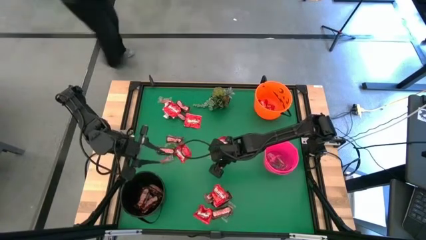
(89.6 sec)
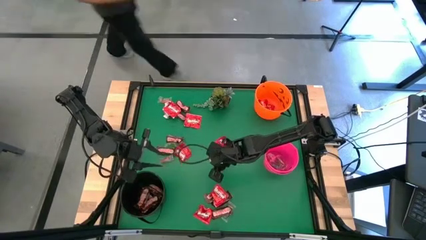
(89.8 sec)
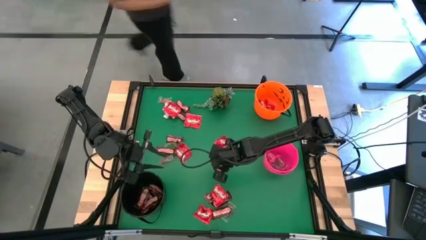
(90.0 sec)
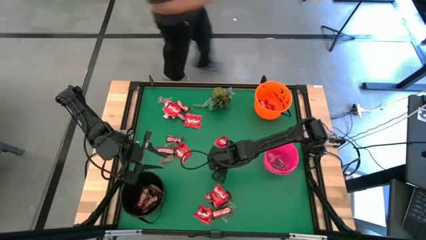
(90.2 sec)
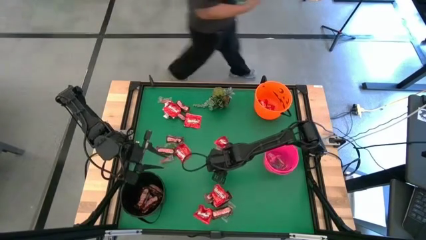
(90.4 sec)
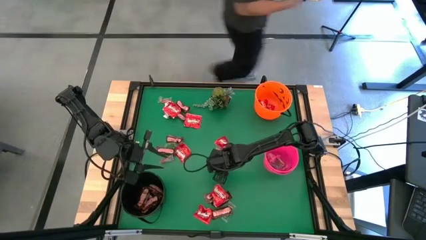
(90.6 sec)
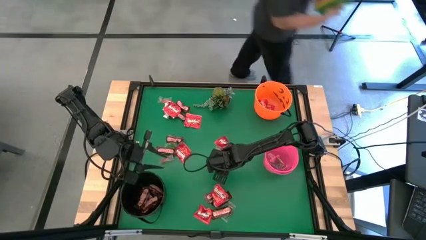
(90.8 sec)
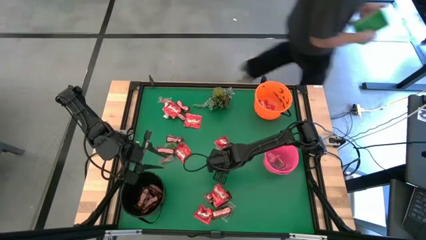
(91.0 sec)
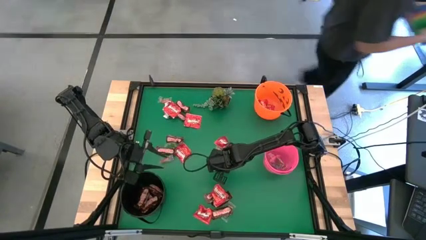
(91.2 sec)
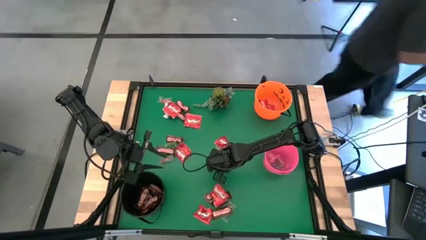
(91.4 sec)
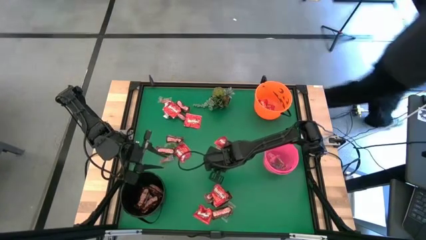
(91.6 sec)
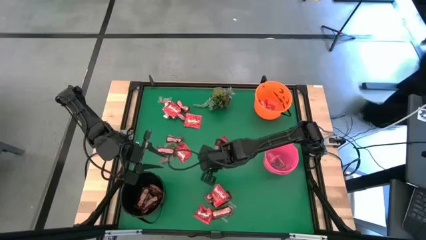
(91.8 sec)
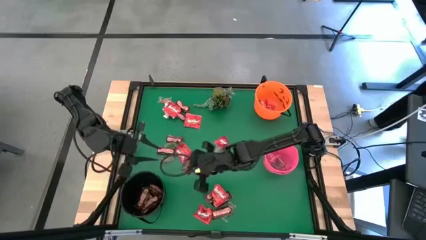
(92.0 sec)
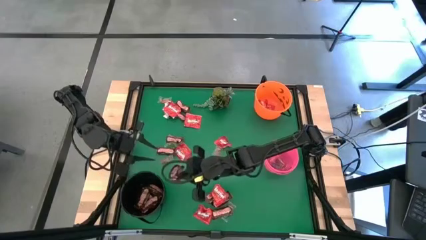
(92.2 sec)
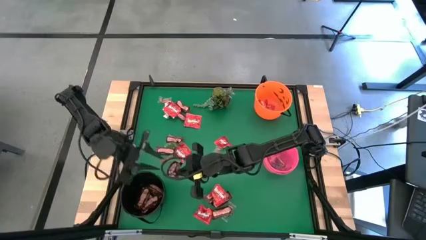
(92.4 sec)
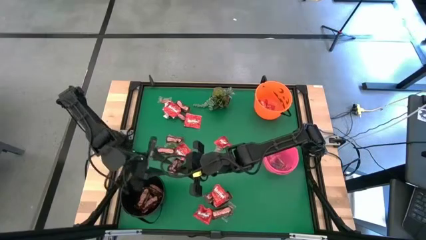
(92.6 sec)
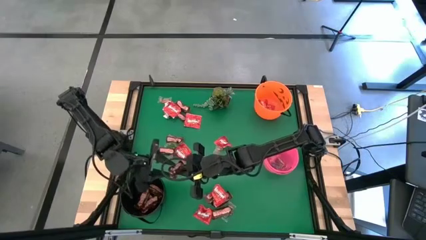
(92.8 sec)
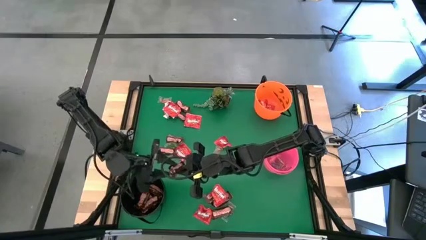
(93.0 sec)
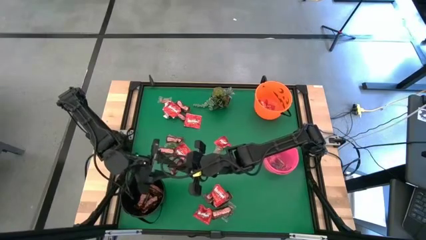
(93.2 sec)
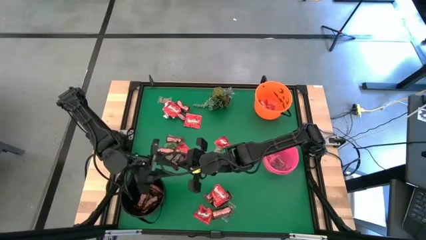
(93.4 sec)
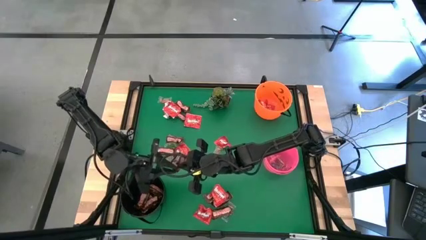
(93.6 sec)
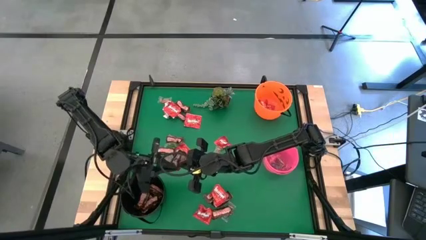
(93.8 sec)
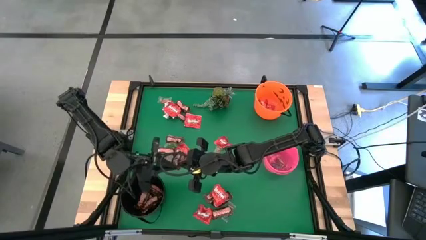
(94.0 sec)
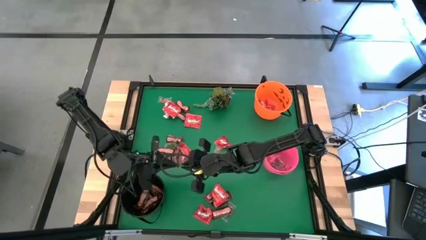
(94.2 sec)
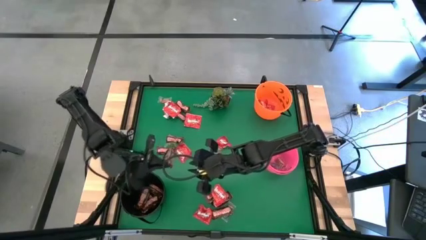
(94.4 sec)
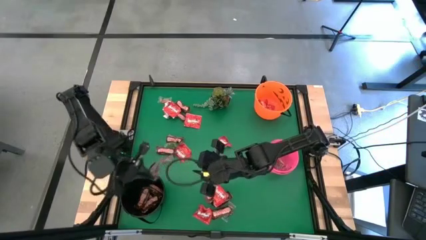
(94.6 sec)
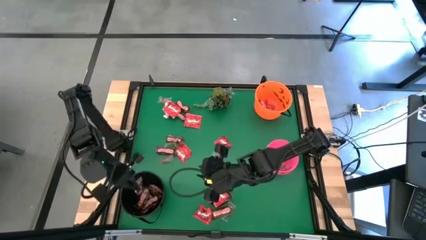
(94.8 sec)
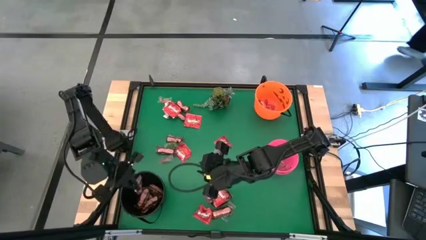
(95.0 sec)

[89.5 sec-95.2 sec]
Task: Sort candy
Put the brown chocolate bar into the black bucket

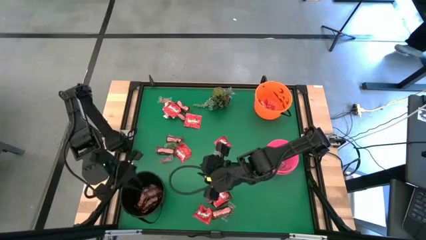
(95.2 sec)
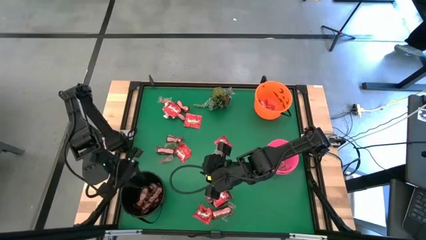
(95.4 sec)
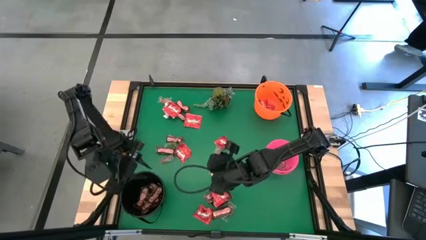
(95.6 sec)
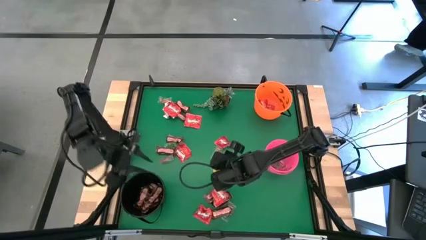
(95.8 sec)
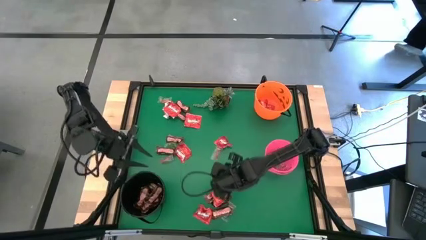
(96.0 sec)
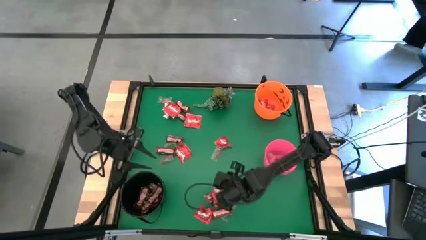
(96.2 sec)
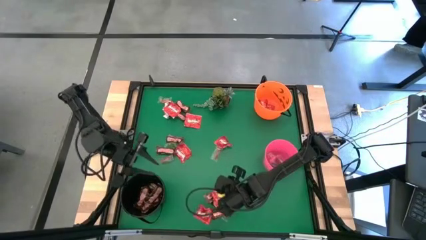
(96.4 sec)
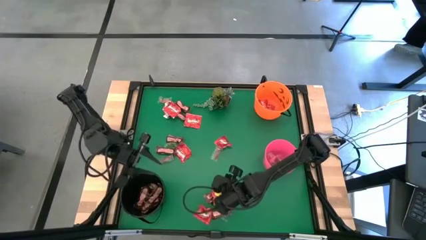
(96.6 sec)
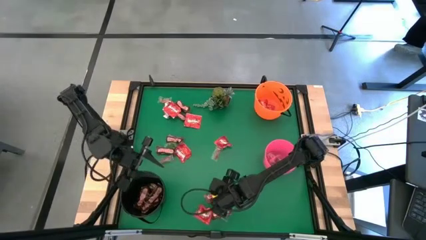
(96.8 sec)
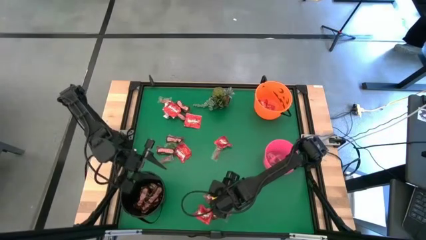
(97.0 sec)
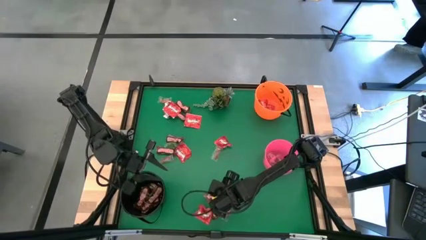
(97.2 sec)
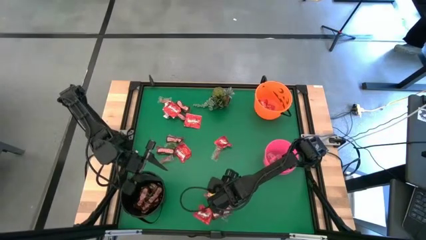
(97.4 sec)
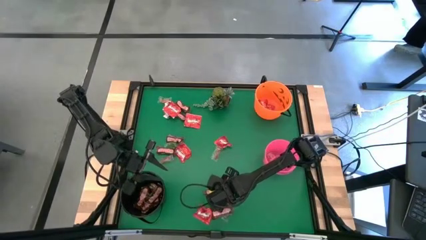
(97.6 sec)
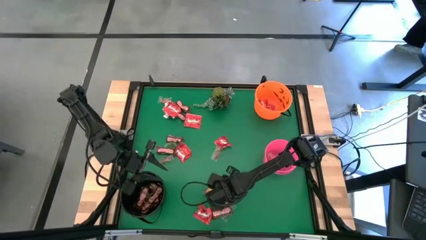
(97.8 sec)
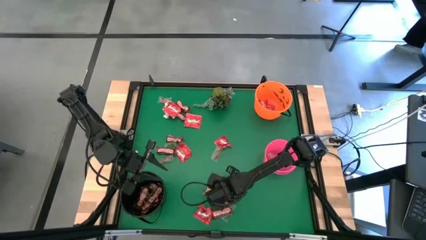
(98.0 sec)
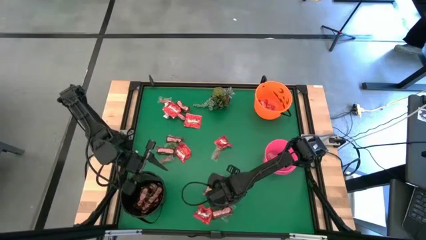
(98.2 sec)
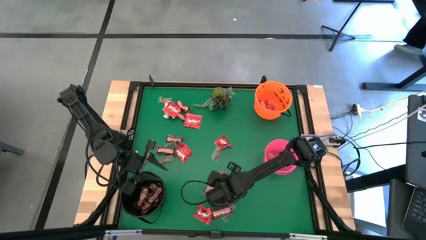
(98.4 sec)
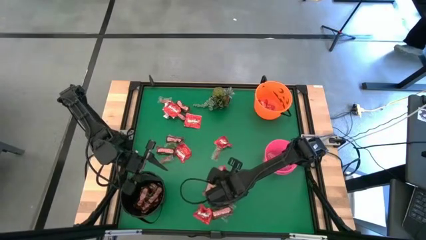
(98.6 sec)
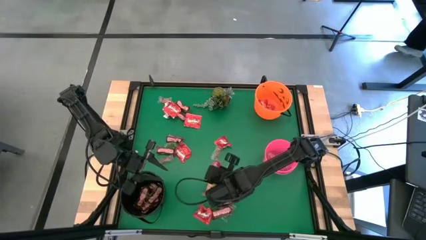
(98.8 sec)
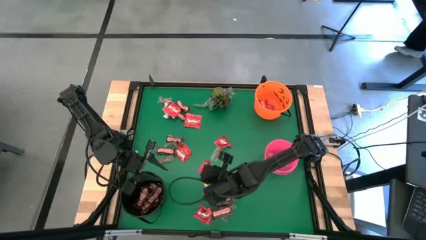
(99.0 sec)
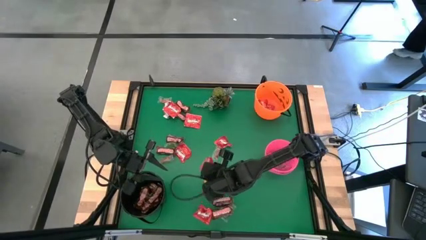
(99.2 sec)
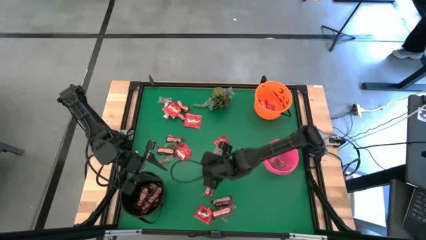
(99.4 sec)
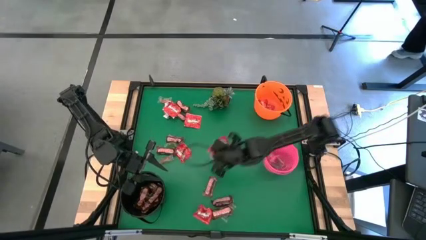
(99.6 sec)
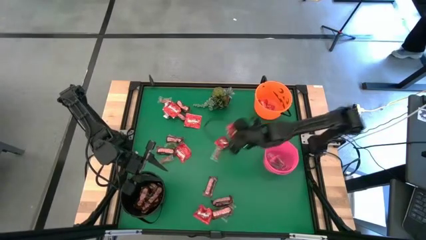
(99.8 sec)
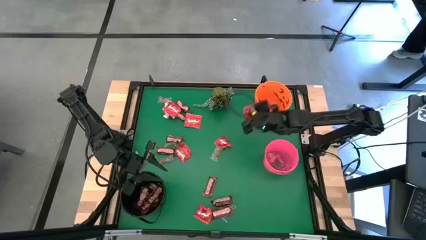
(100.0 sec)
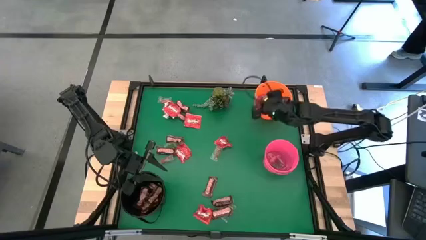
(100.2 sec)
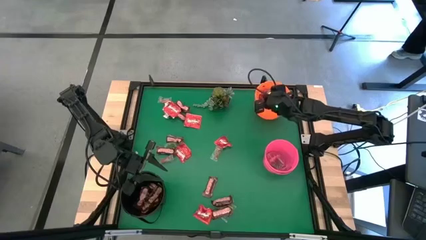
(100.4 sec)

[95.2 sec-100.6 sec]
Put the red candy into the orange bucket

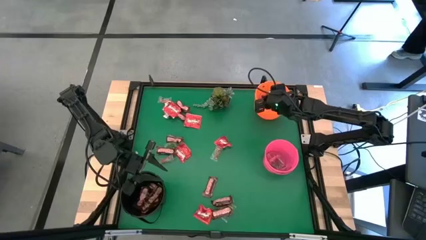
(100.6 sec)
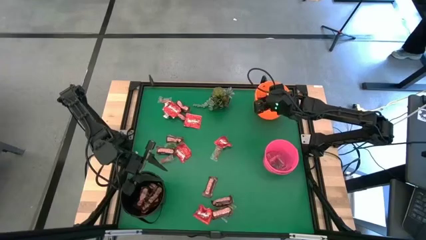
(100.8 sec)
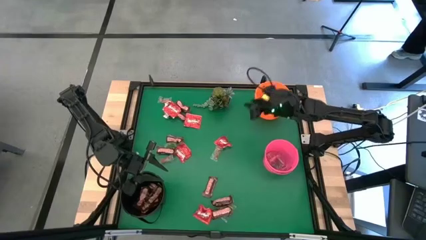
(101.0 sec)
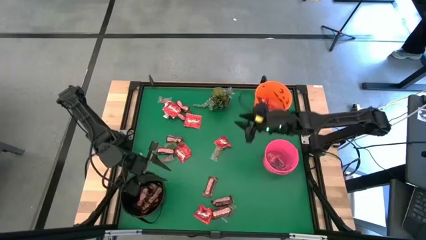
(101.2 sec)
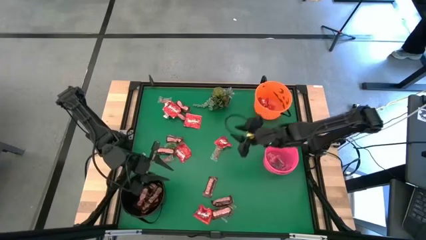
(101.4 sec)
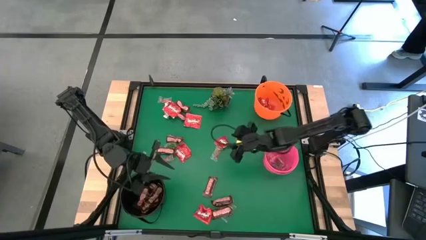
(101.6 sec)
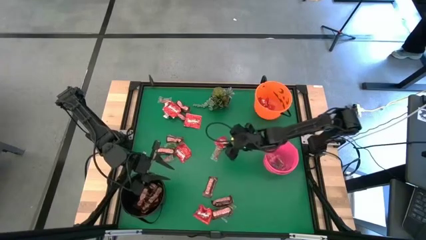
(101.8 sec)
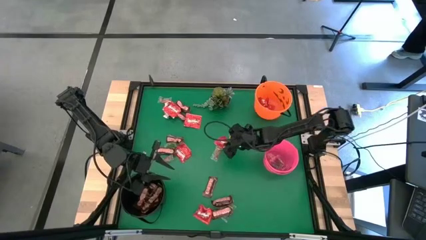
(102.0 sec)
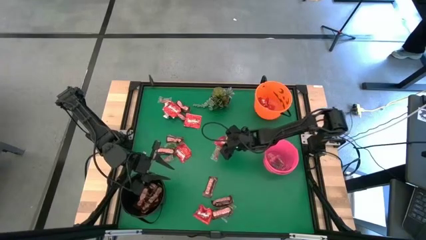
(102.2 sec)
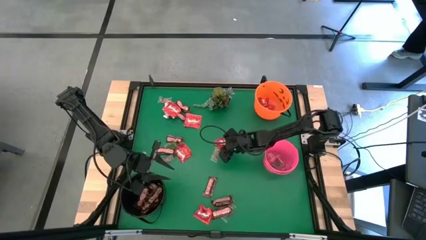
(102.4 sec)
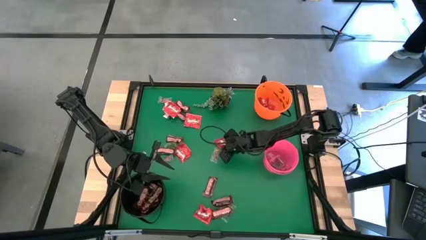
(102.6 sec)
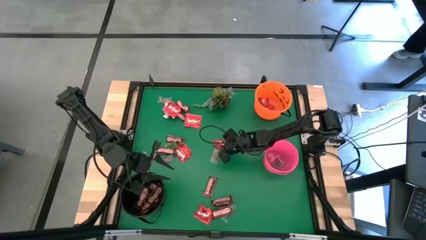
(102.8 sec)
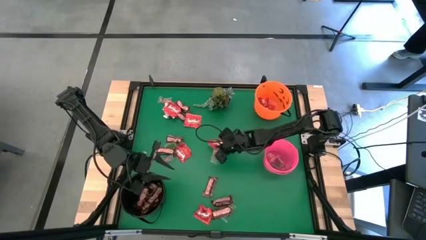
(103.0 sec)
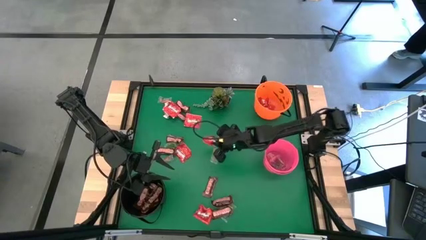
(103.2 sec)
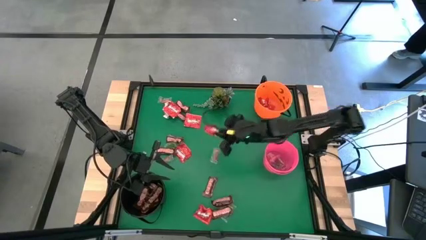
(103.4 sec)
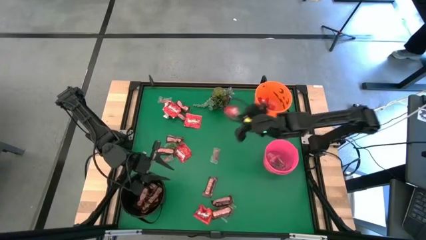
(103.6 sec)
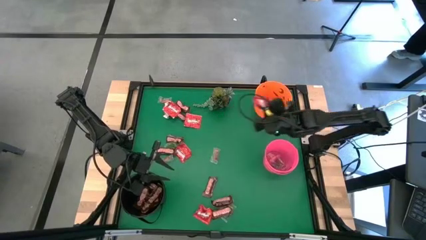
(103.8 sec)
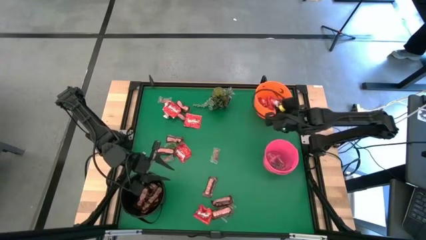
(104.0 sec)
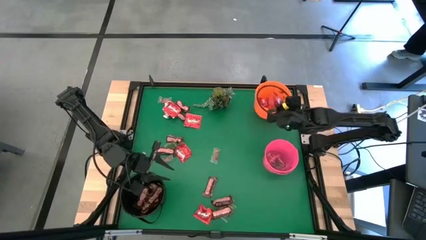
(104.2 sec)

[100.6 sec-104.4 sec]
Put the red candy into the orange bucket

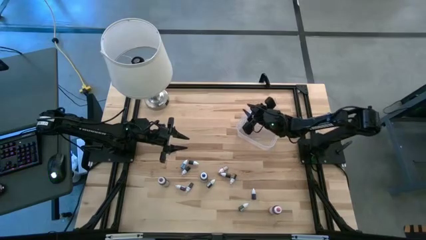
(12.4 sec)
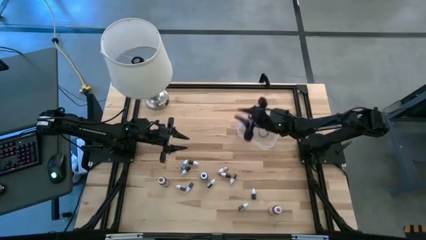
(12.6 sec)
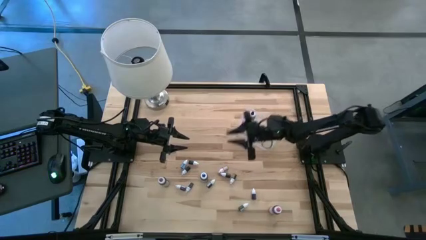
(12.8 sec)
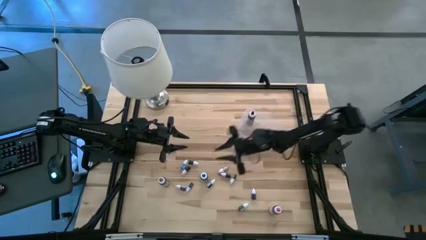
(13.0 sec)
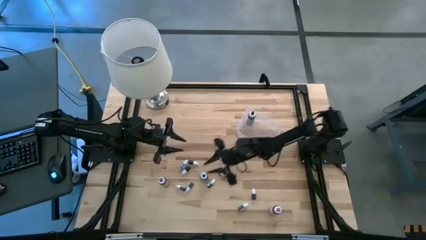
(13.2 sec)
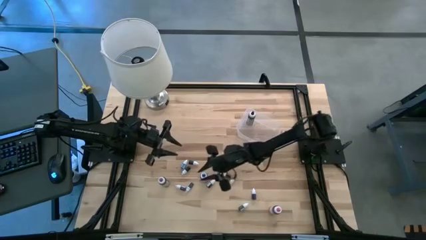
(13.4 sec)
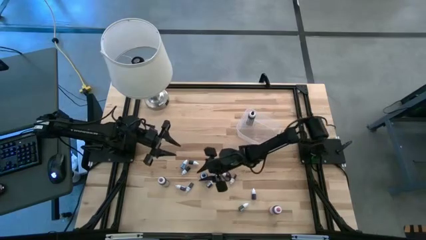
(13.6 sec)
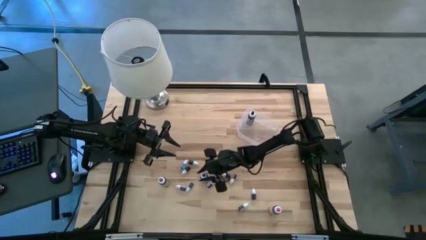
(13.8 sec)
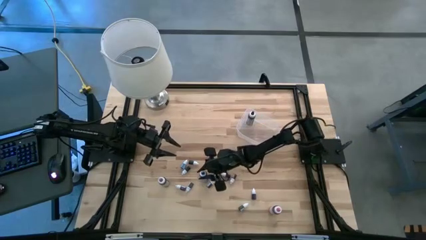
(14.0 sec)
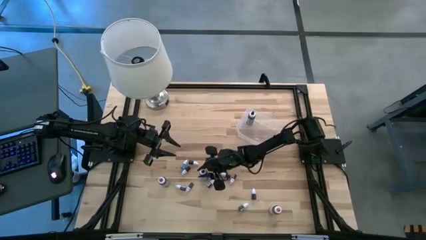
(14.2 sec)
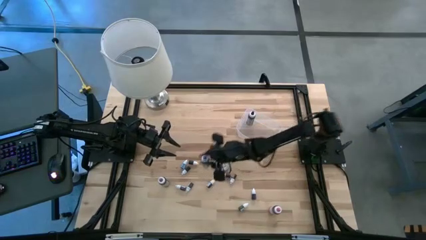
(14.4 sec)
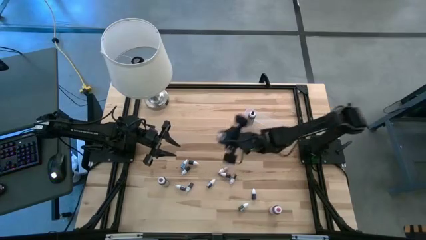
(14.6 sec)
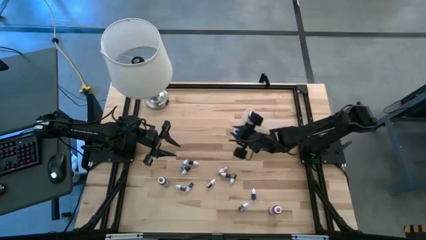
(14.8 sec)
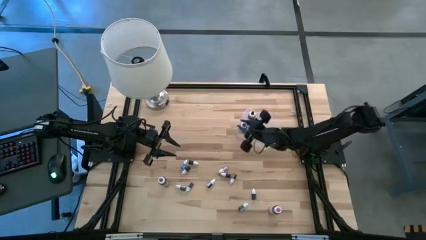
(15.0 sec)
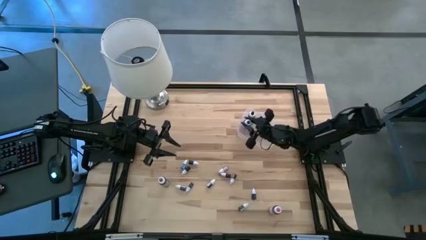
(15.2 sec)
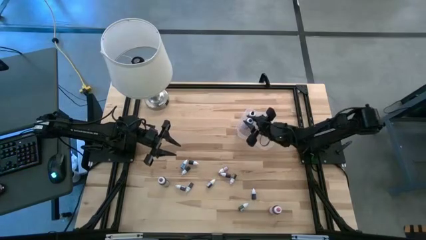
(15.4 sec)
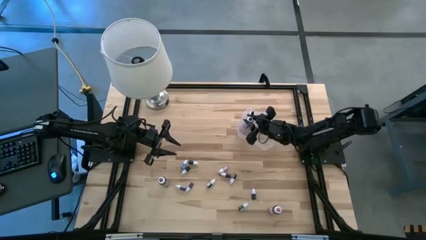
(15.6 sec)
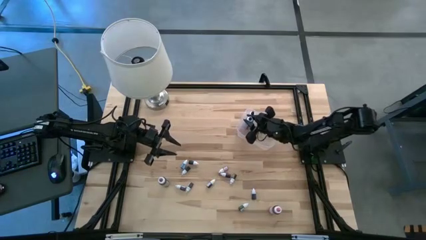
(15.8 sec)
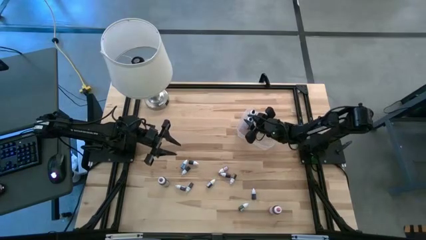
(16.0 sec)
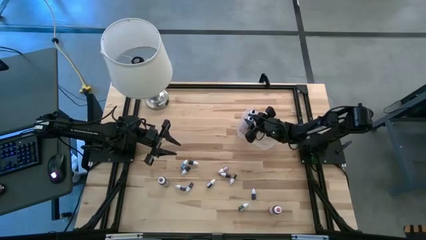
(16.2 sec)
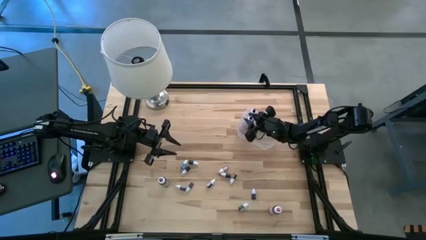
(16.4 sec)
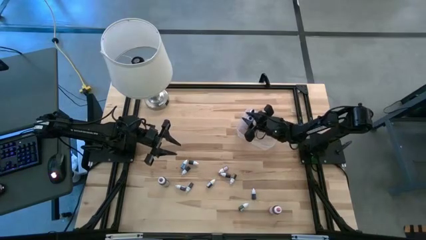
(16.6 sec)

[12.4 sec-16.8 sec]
Task: Pick & Place food coloring
Put the large blue food coloring bottle into the transparent bin
